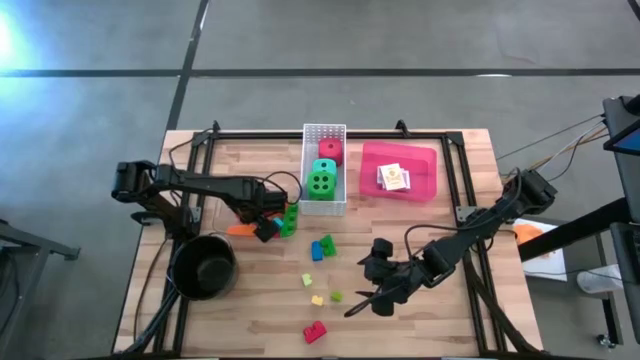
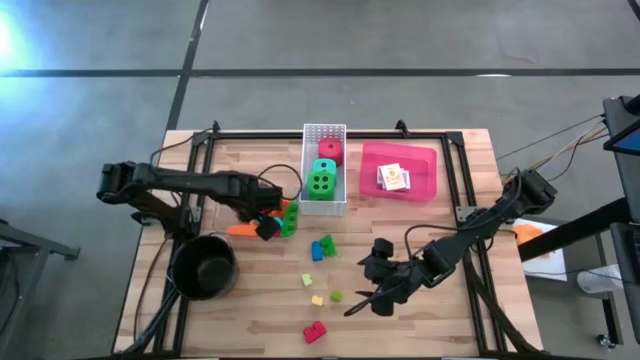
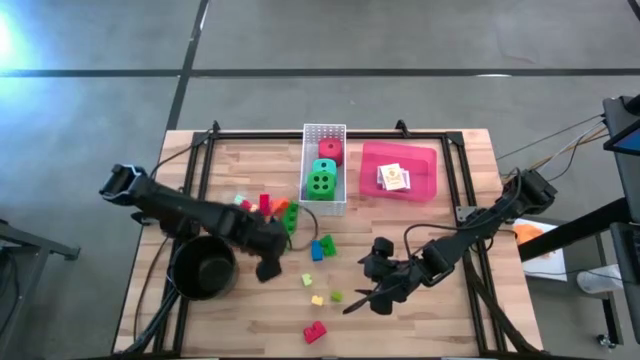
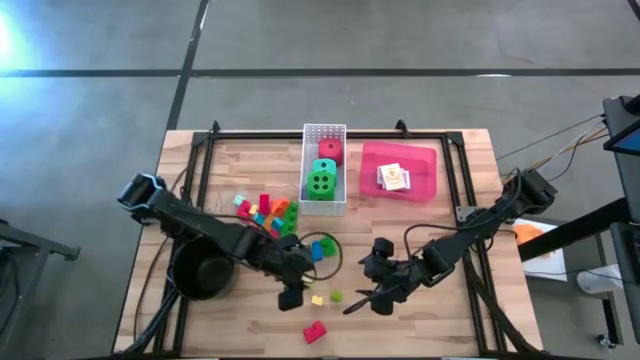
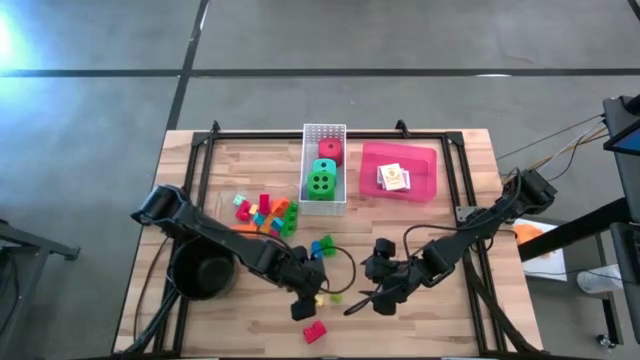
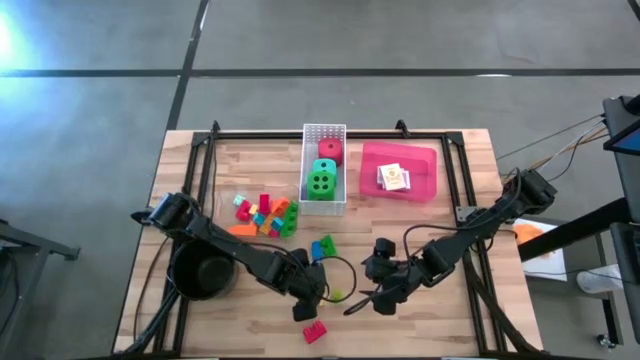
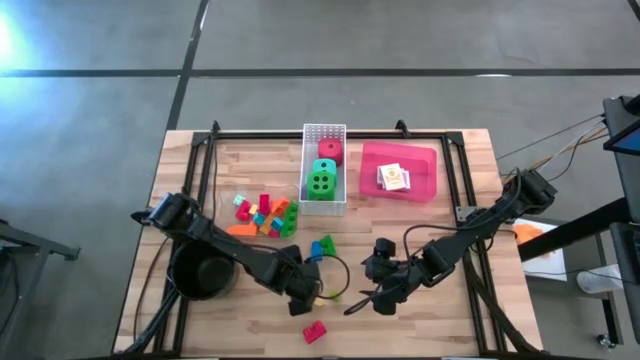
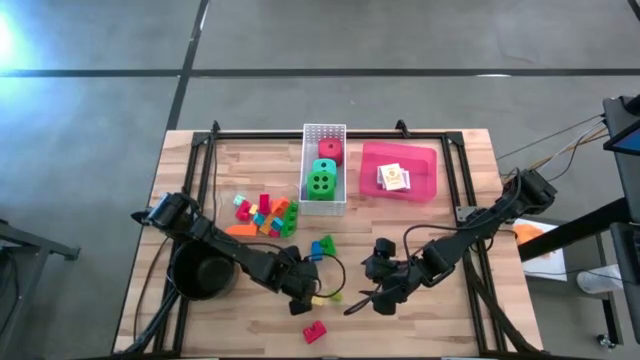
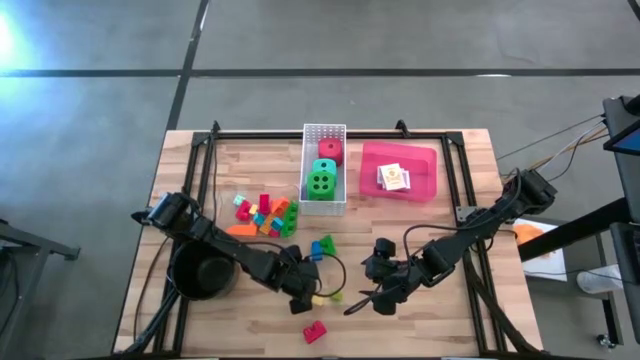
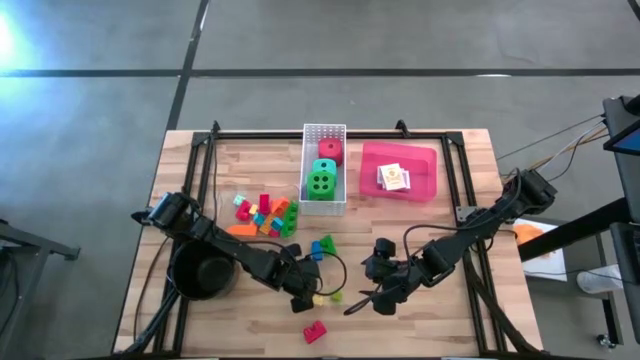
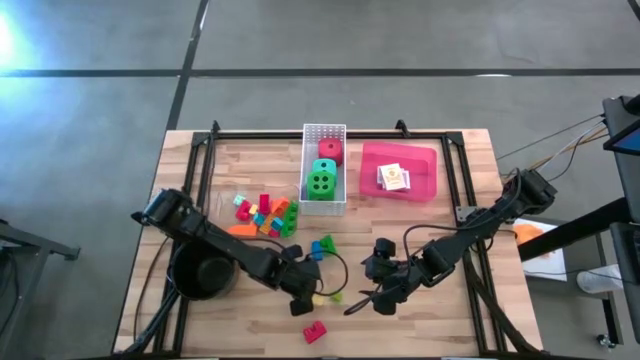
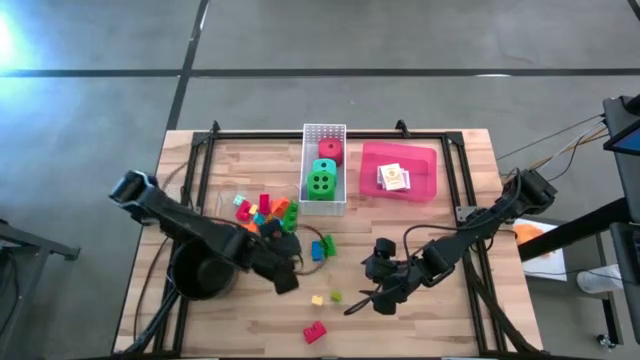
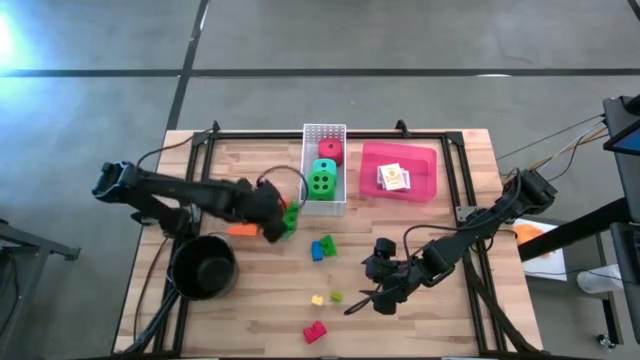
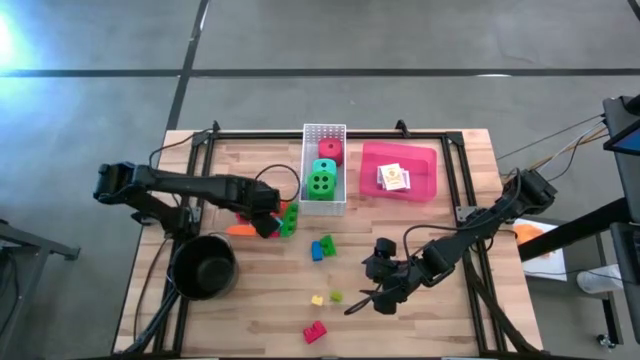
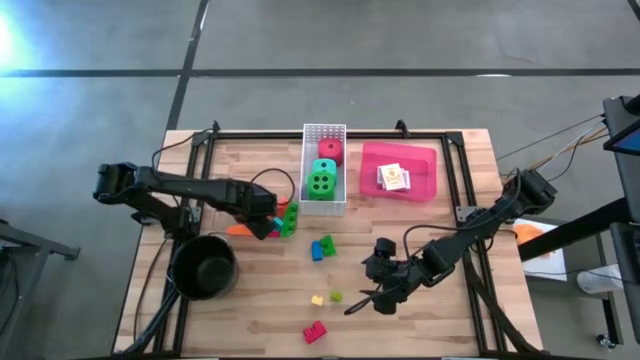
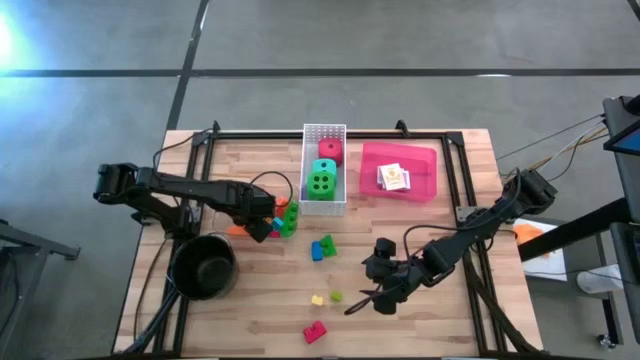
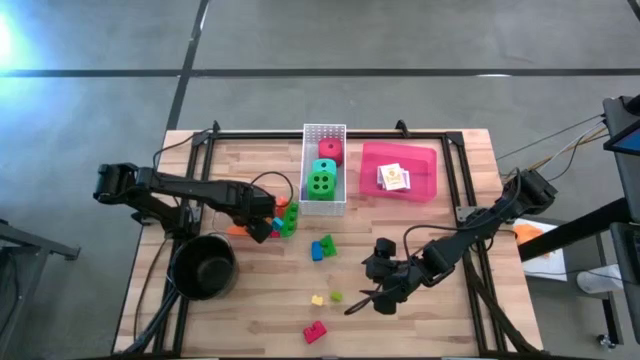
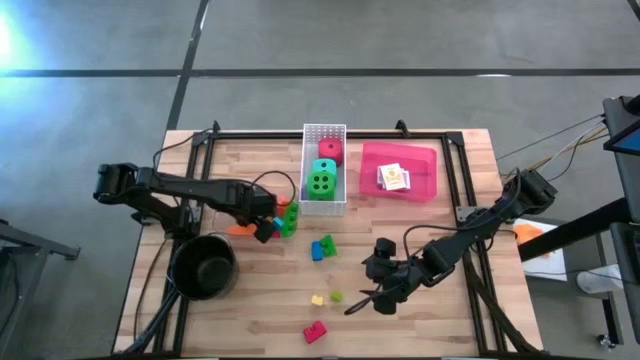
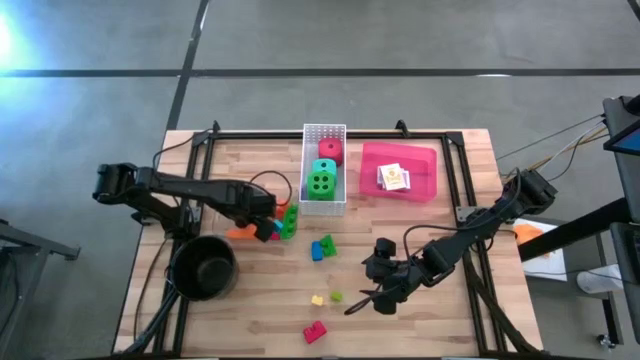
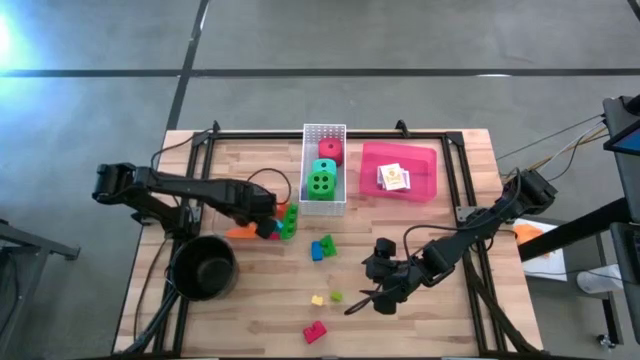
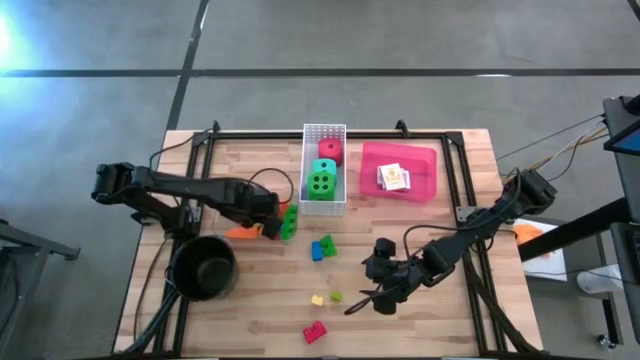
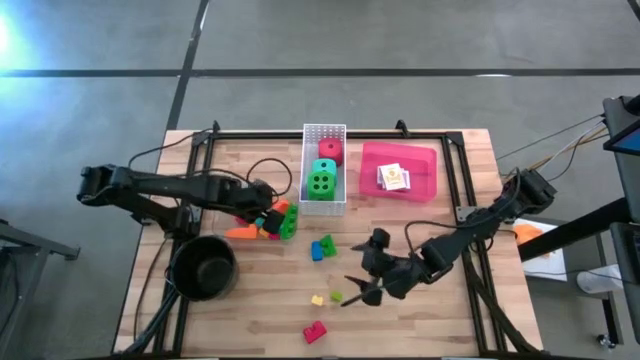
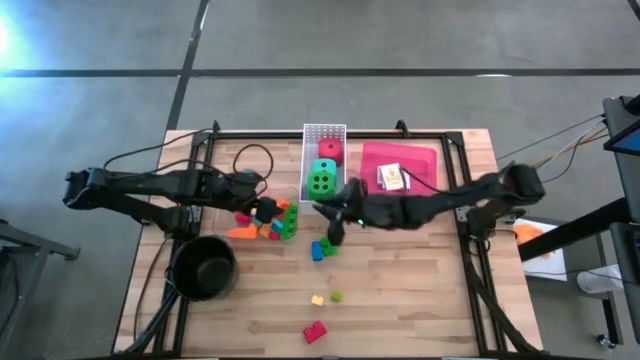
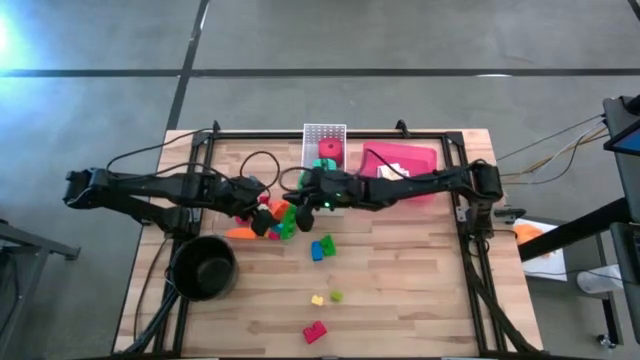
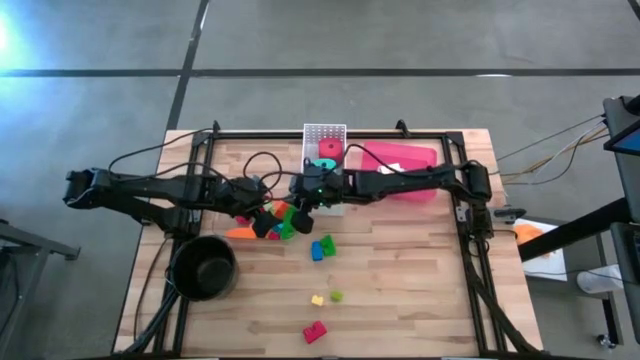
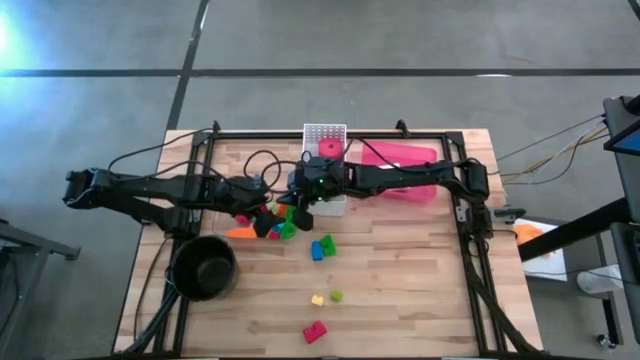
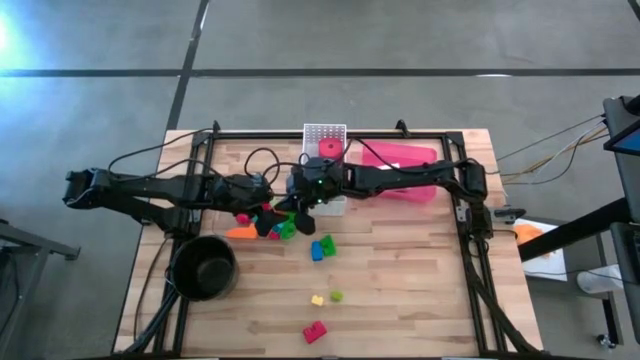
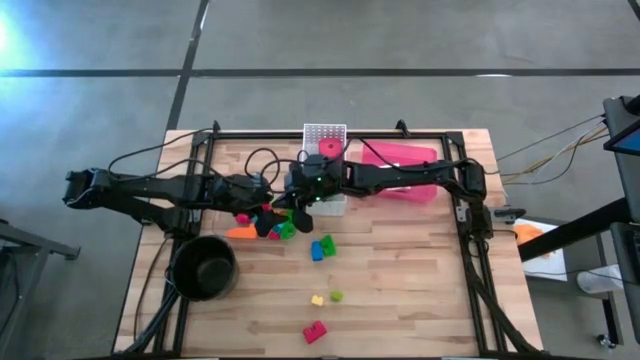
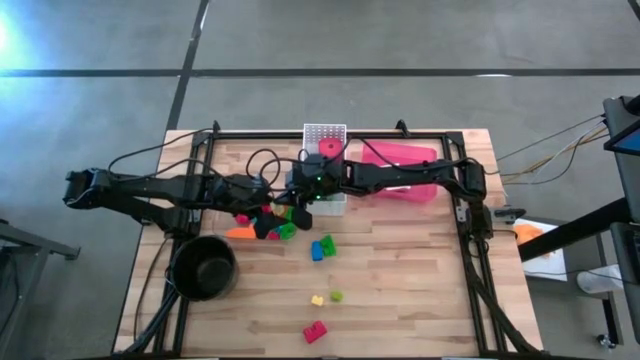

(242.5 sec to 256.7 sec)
Task: Pick & Place Toys
Put the light green game piece into the transparent bin

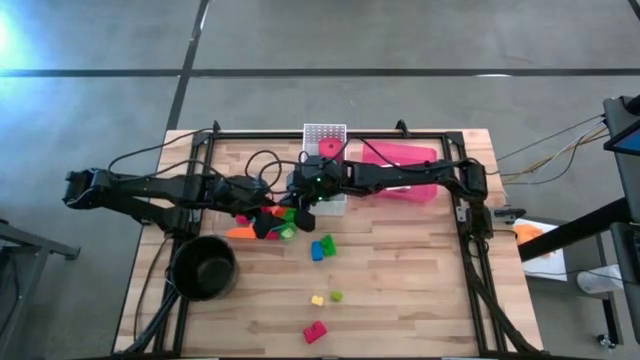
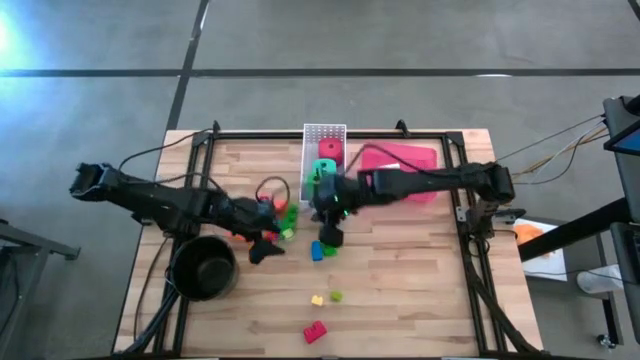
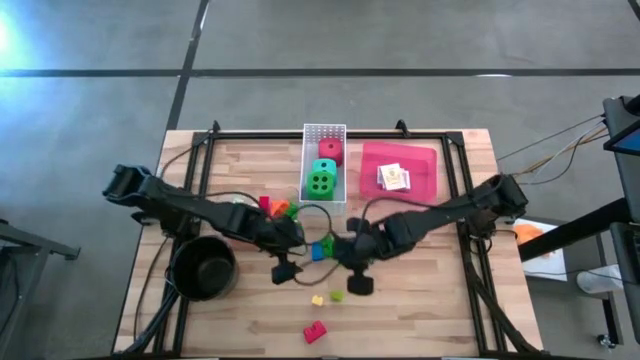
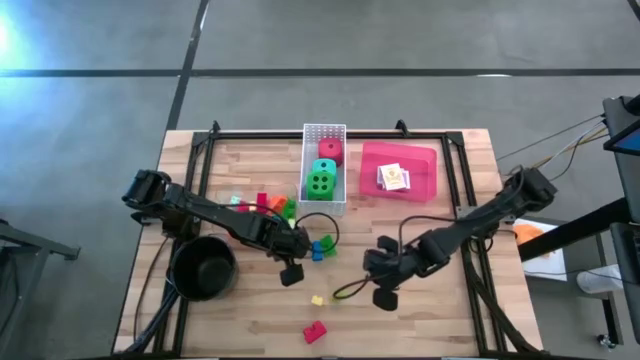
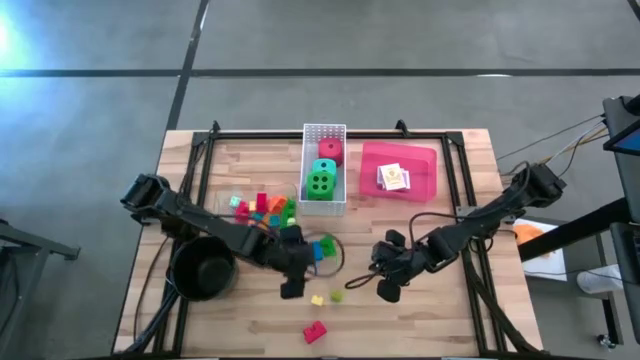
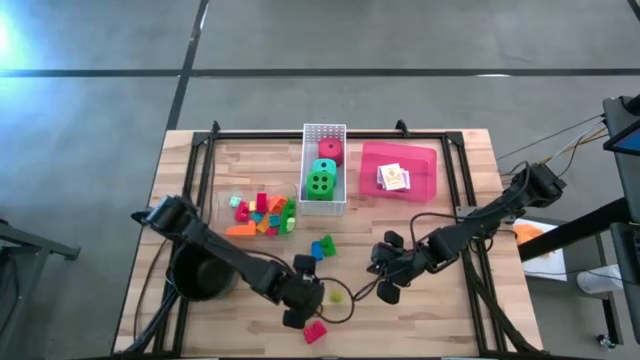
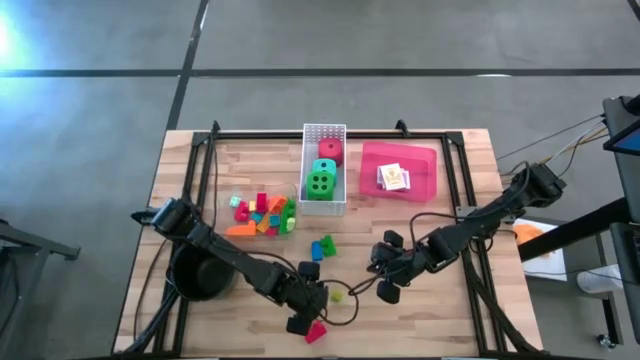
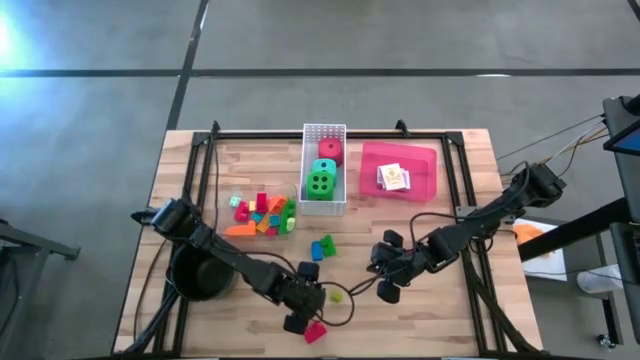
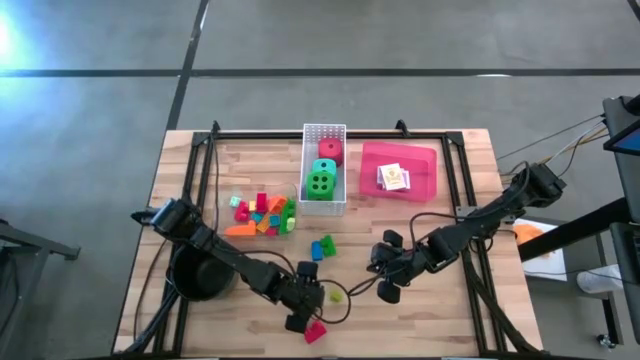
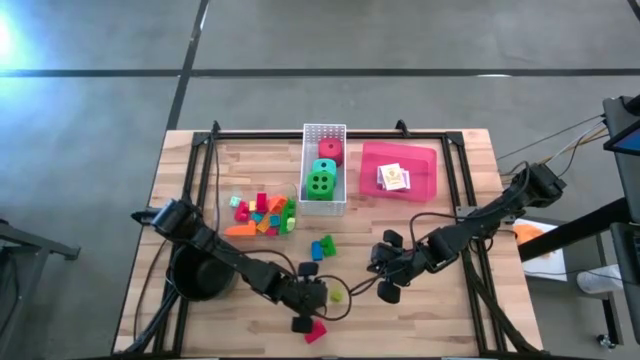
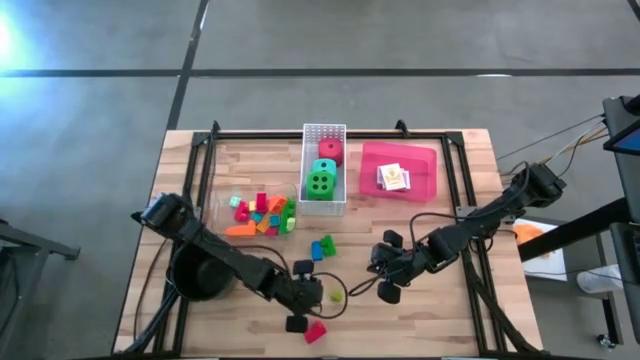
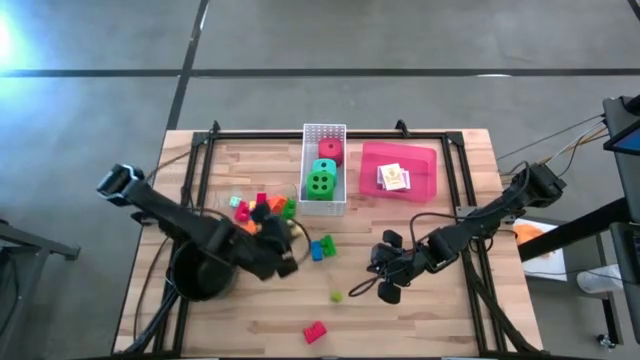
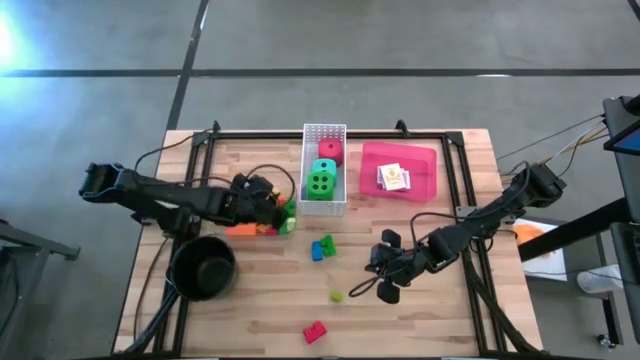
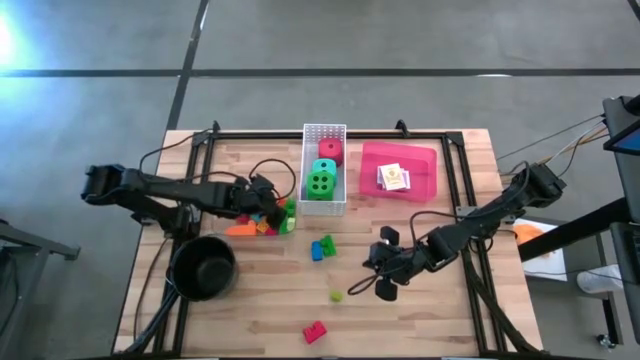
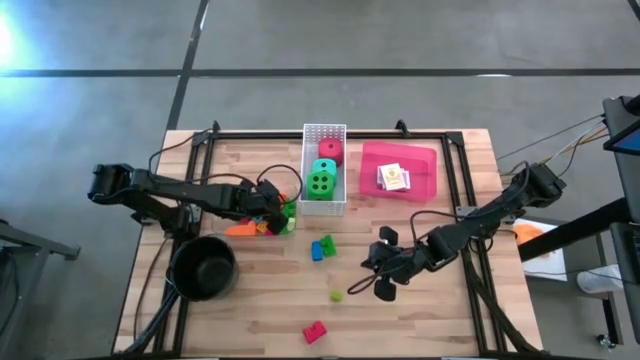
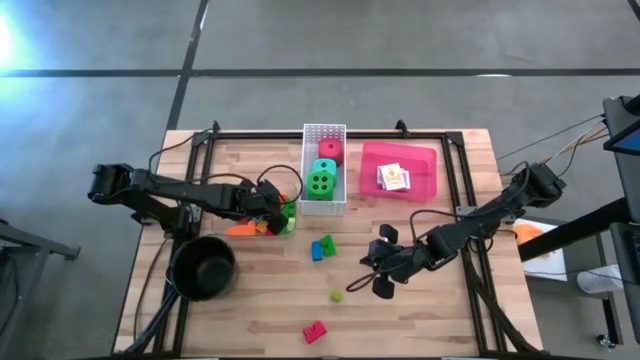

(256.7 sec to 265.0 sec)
Put the light yellow game piece into the transparent bin
